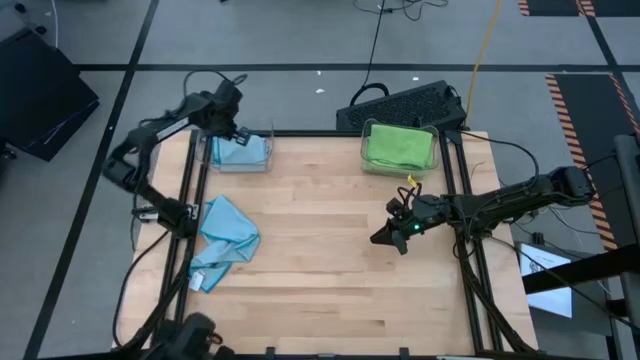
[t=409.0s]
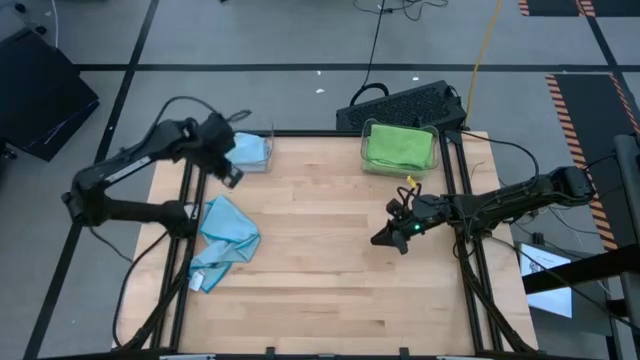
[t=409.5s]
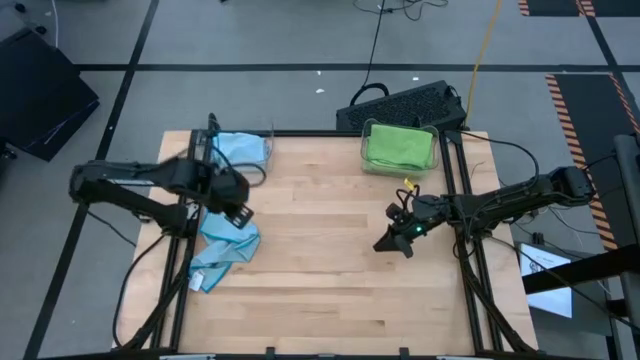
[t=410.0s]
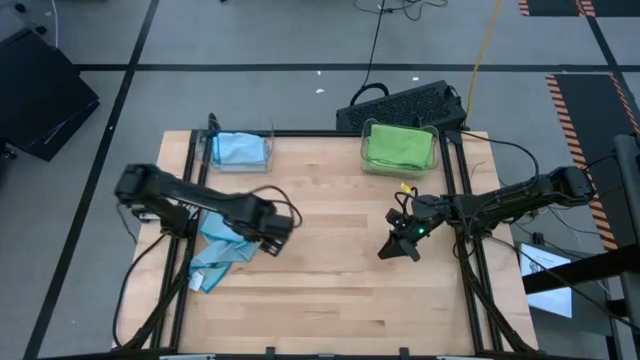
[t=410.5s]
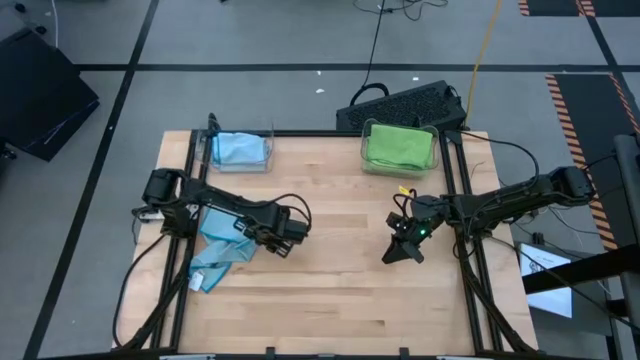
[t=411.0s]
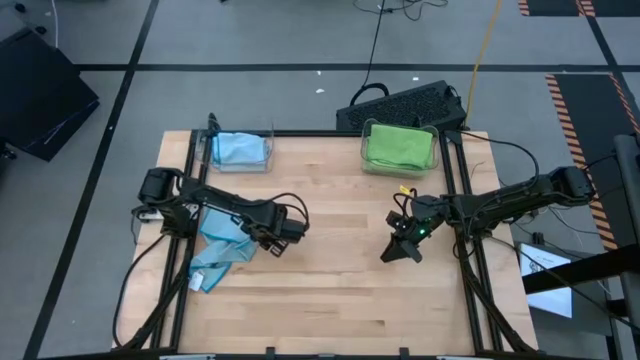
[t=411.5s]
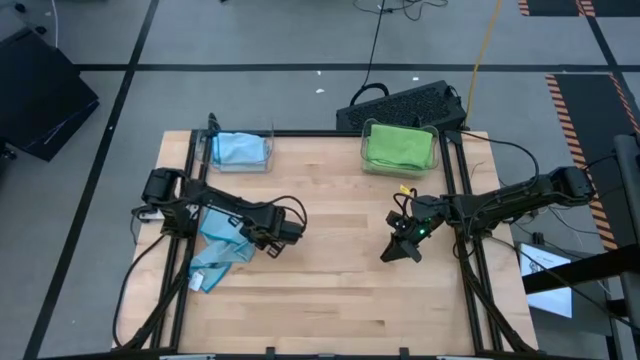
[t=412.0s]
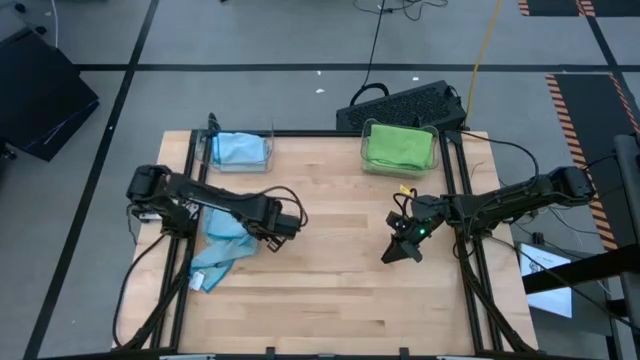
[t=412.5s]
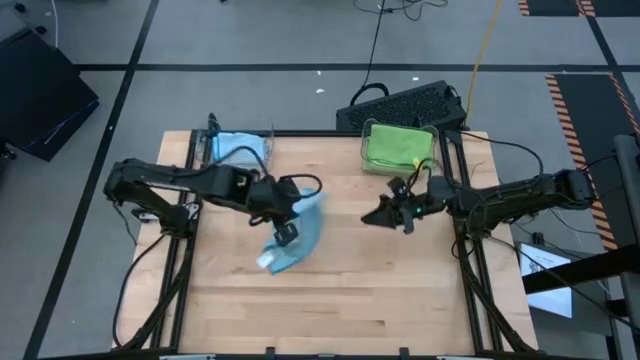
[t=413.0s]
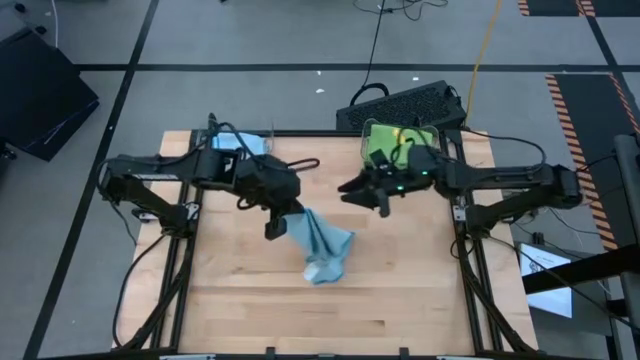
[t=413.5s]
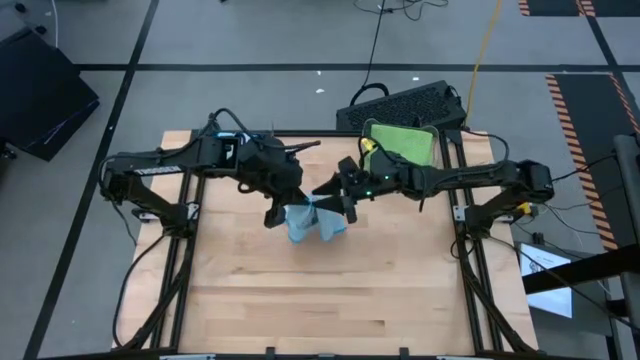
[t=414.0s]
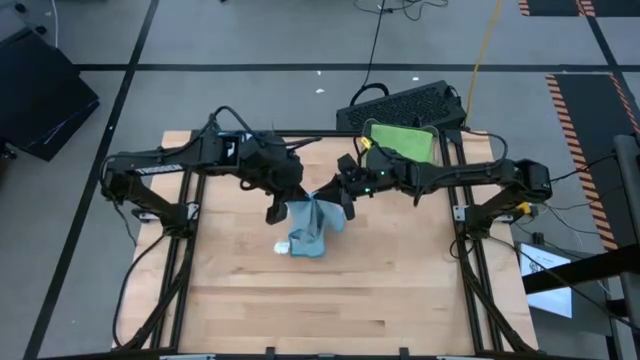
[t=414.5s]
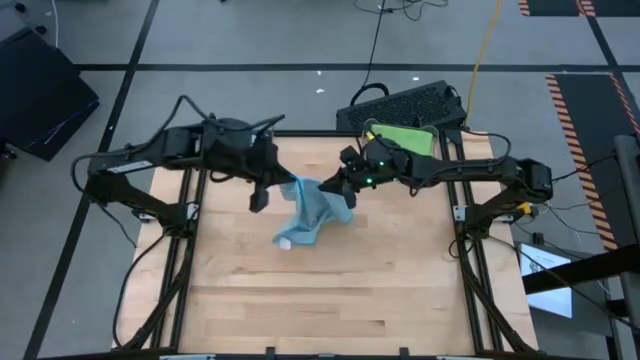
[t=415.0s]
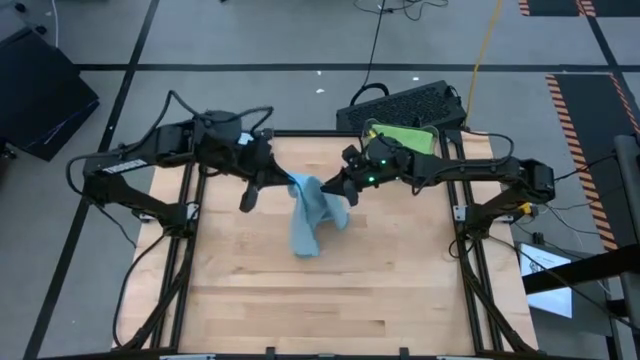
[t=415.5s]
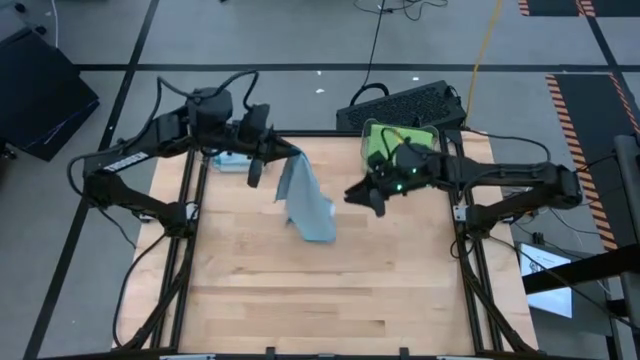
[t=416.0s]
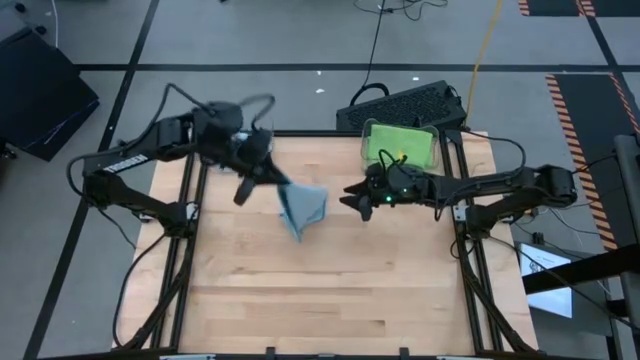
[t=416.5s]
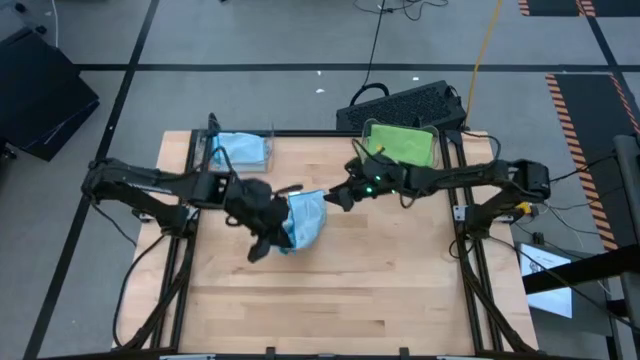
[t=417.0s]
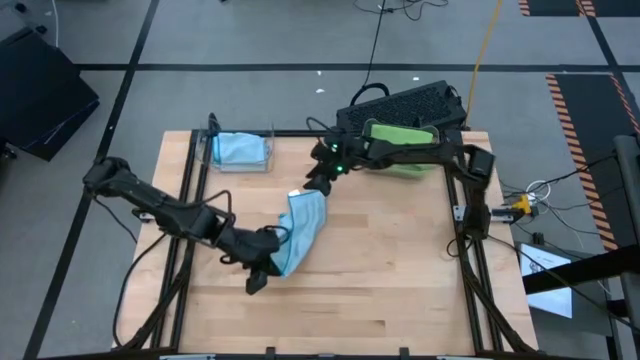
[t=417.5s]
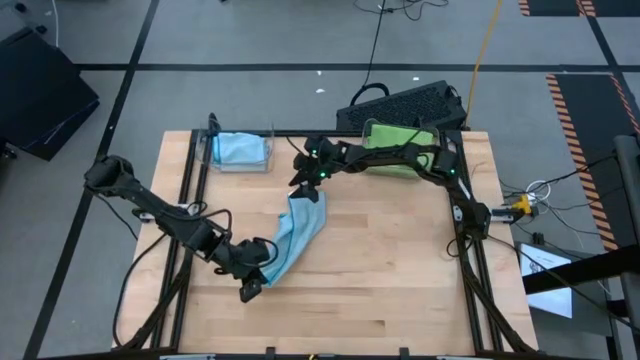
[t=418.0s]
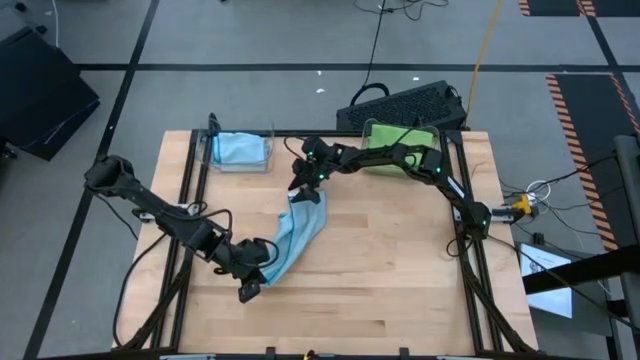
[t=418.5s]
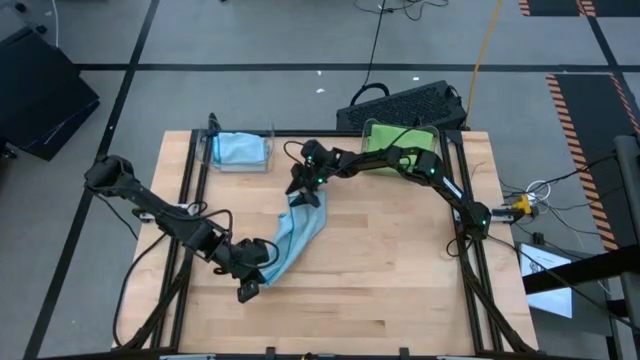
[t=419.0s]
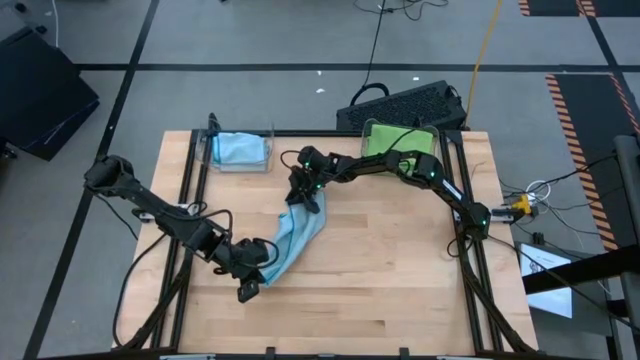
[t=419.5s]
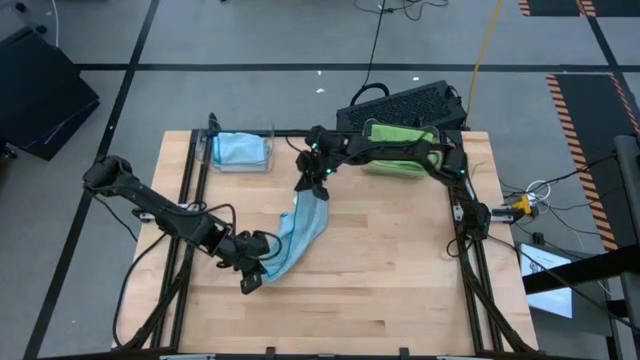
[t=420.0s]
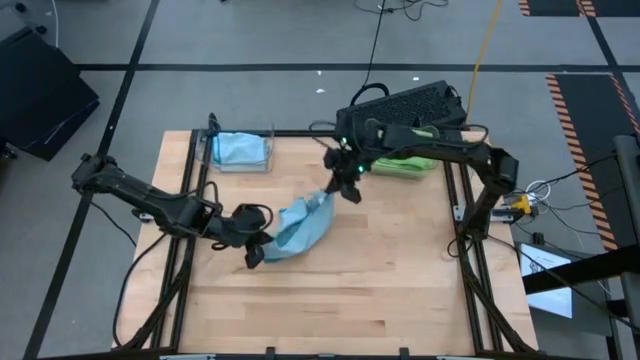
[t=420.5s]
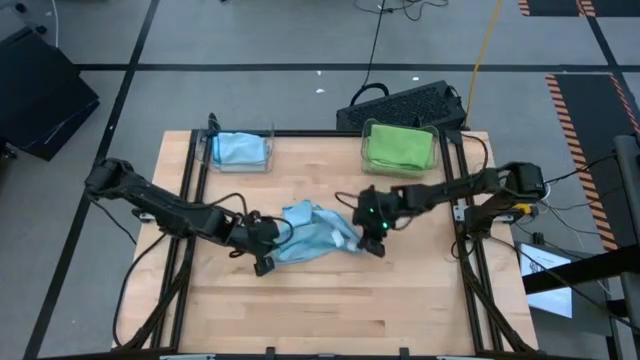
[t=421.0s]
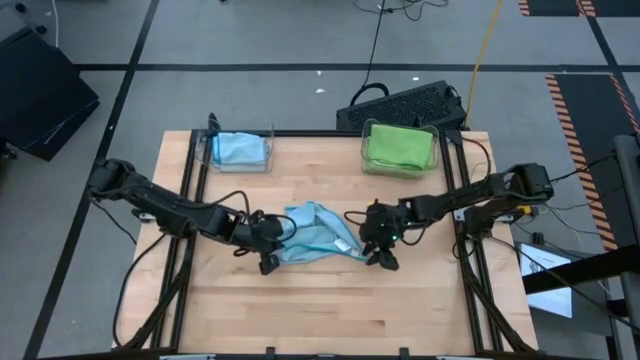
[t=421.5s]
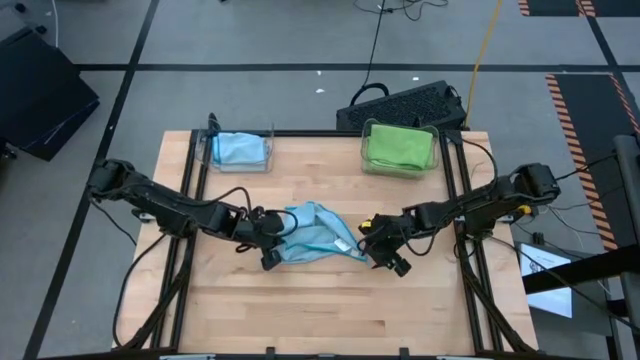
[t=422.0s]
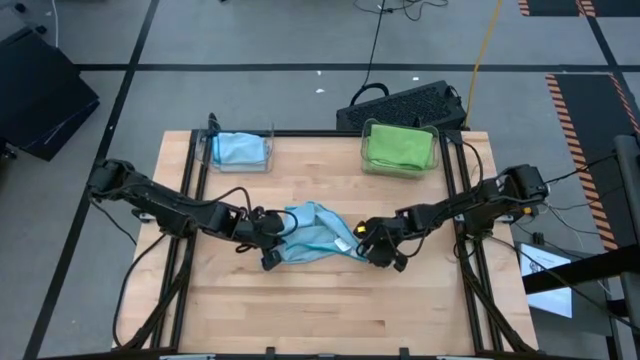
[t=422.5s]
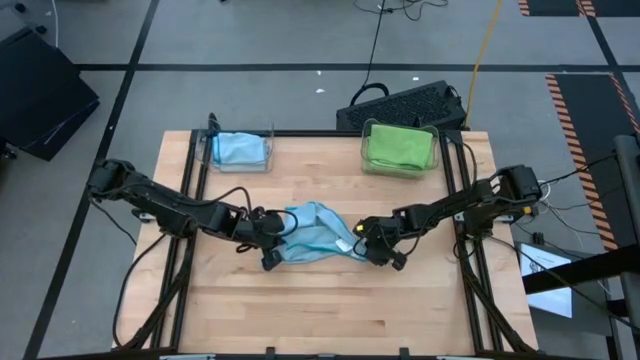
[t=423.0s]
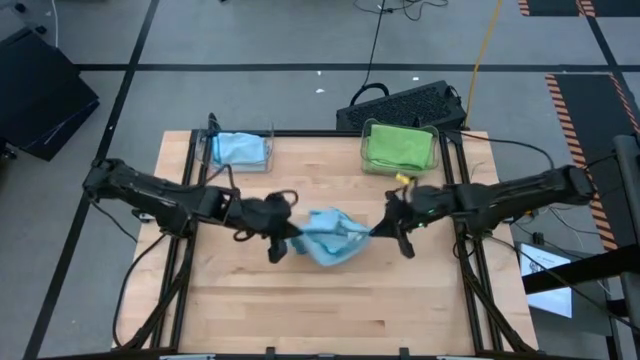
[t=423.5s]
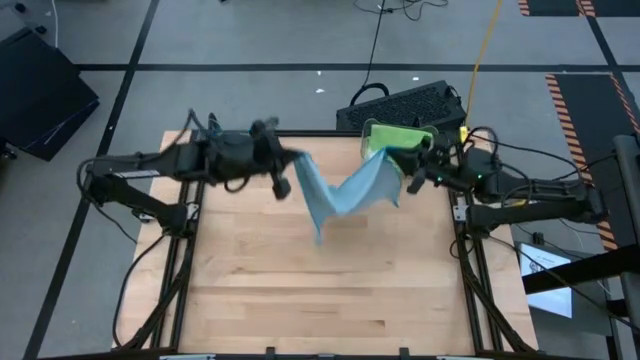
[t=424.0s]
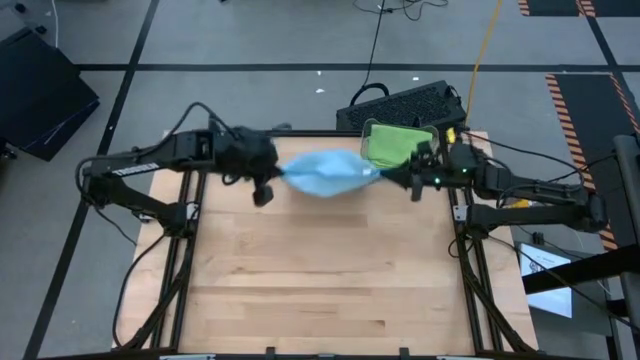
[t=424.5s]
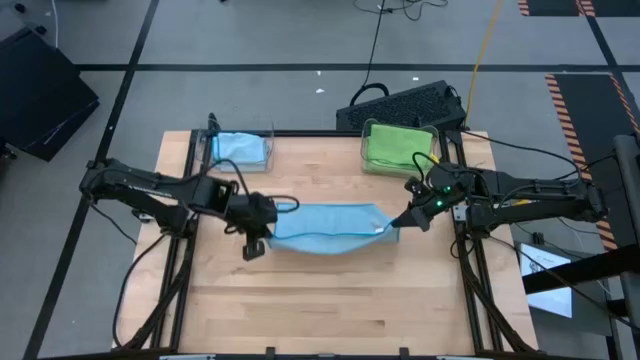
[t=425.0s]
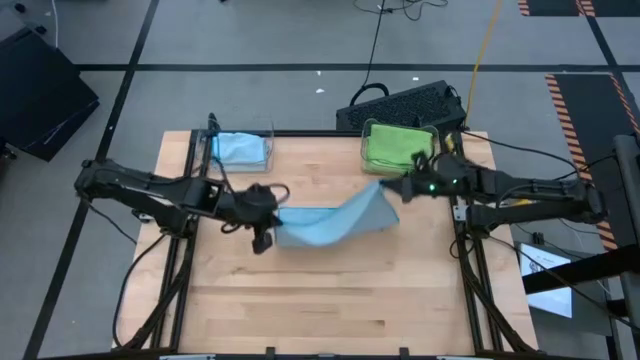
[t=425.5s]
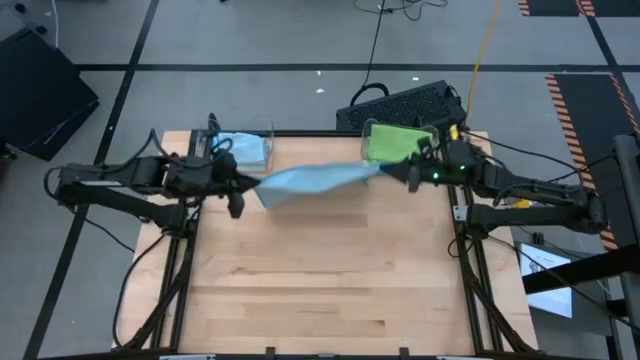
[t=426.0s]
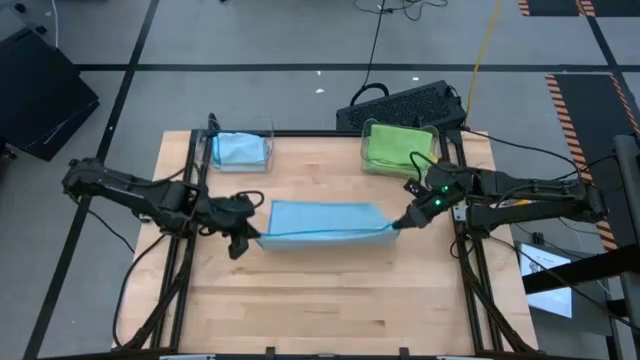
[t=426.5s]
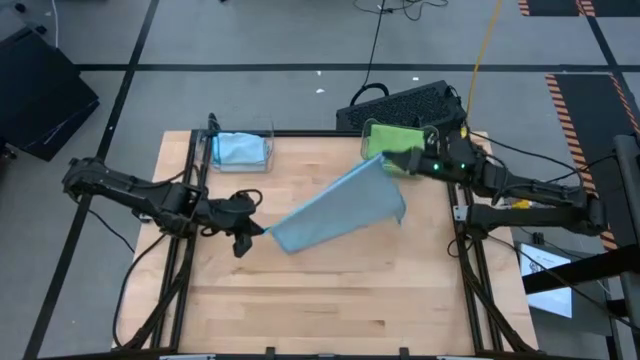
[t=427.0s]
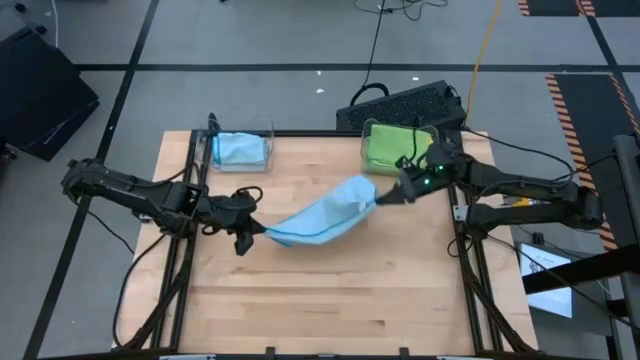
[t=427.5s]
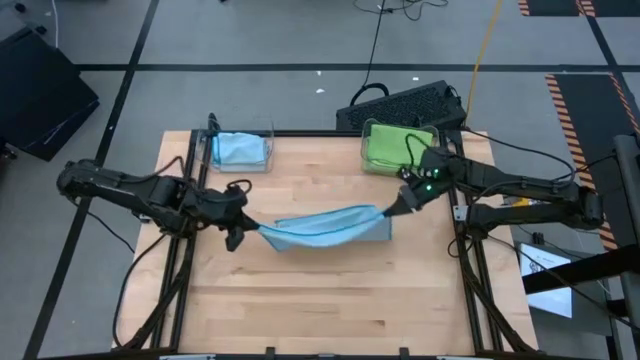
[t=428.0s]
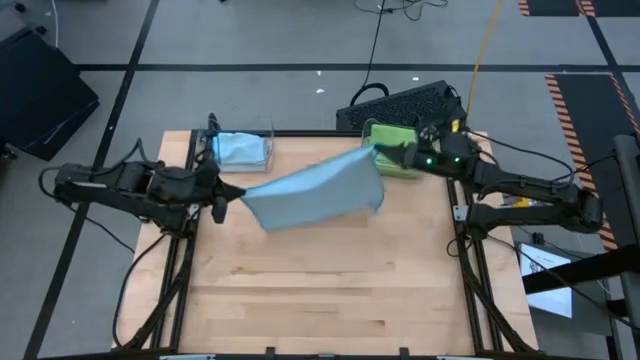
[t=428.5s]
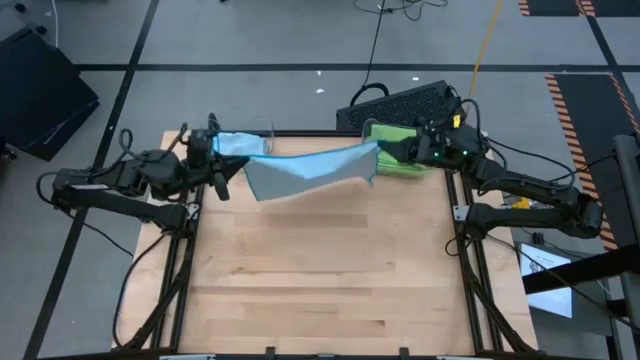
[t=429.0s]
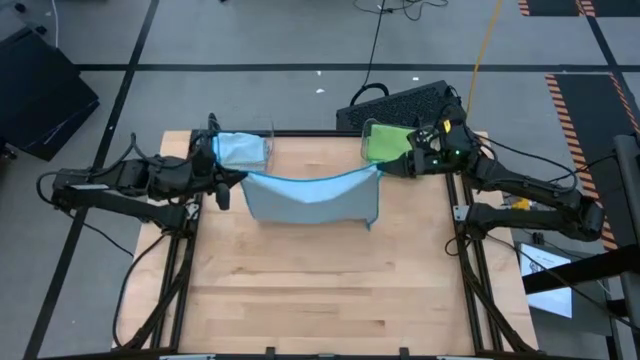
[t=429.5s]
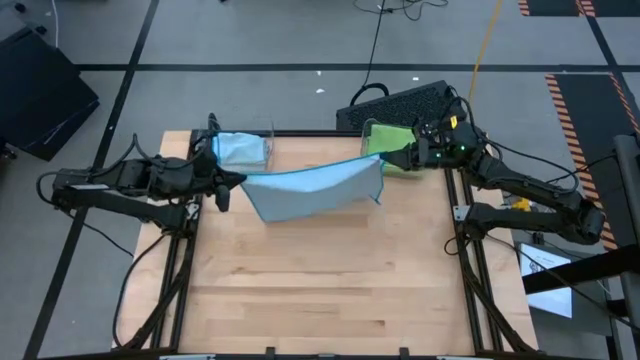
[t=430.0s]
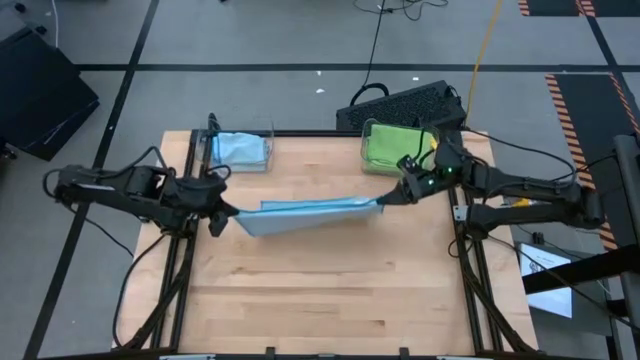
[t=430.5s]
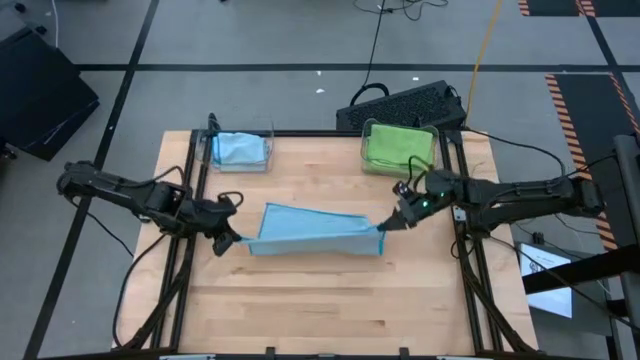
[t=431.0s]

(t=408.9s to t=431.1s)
Task: Sort microfiber towel by color & place in baskets
Fold the blue towel
